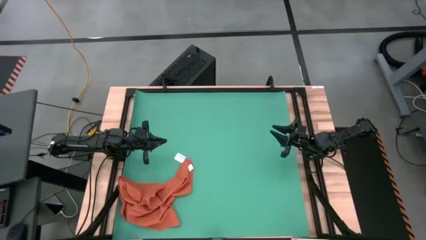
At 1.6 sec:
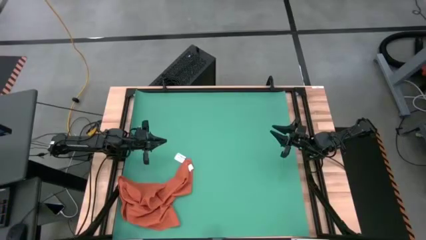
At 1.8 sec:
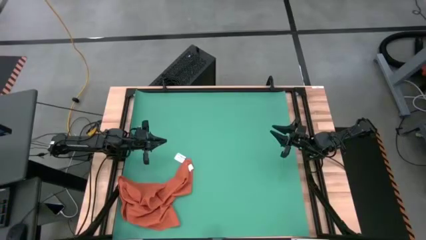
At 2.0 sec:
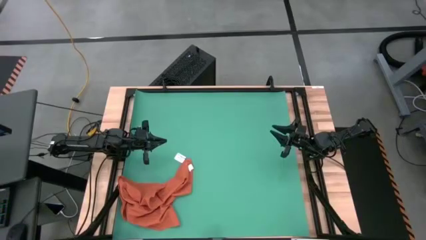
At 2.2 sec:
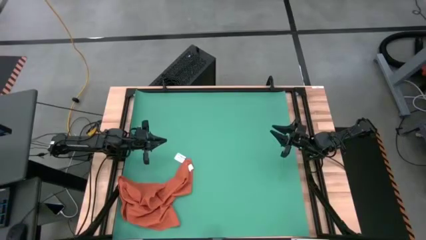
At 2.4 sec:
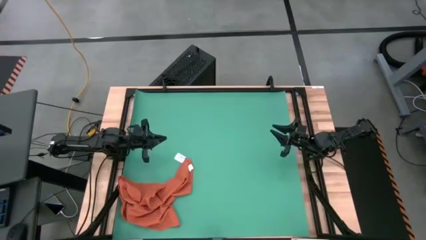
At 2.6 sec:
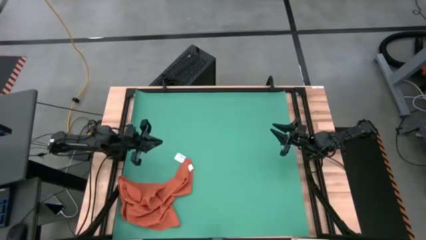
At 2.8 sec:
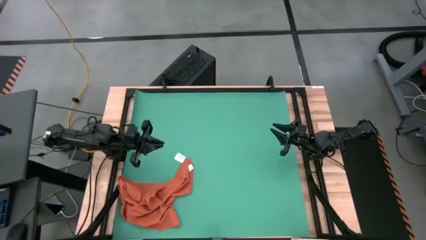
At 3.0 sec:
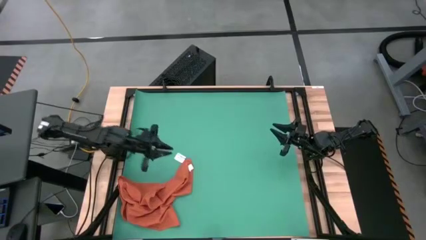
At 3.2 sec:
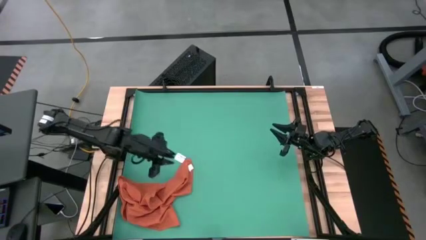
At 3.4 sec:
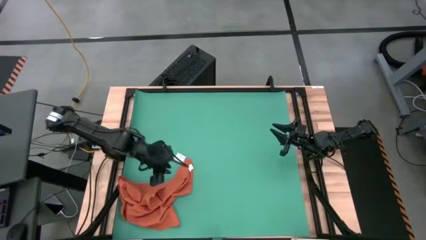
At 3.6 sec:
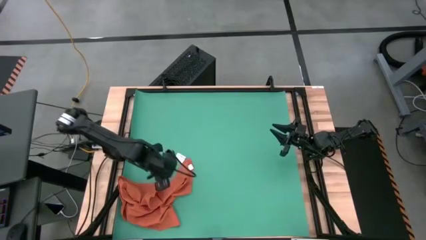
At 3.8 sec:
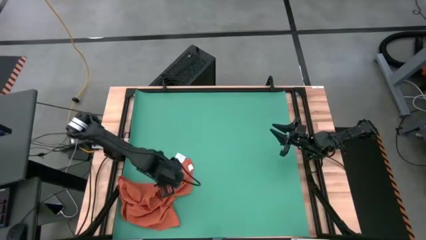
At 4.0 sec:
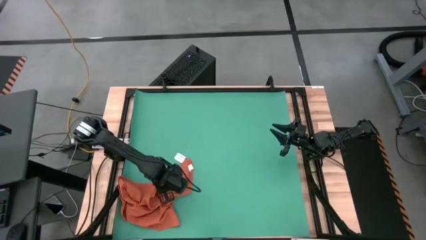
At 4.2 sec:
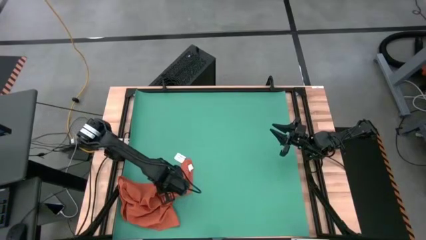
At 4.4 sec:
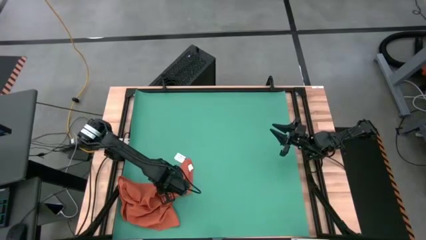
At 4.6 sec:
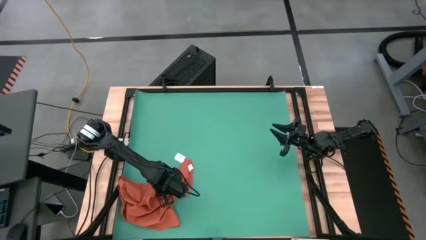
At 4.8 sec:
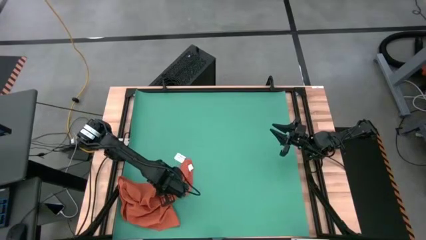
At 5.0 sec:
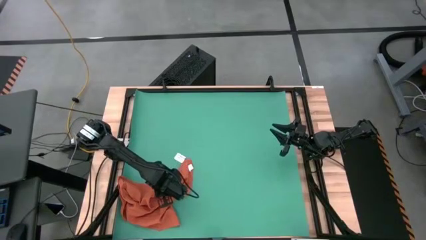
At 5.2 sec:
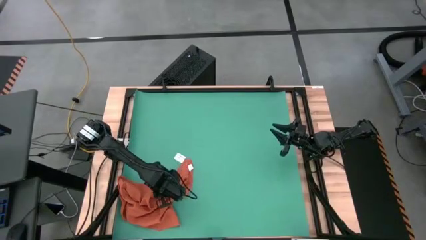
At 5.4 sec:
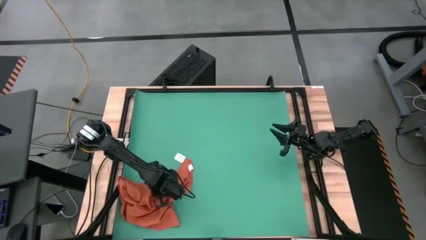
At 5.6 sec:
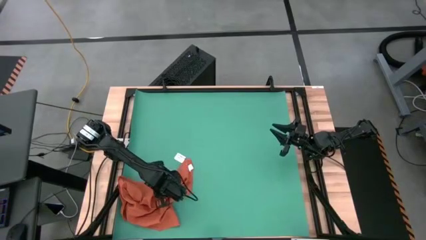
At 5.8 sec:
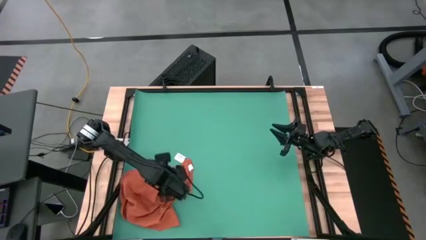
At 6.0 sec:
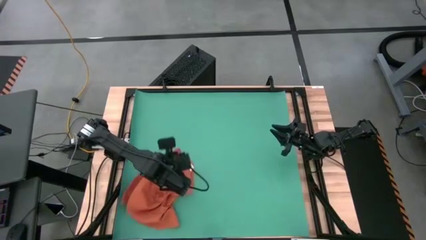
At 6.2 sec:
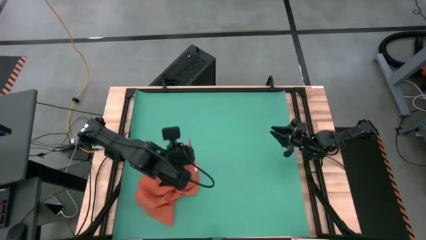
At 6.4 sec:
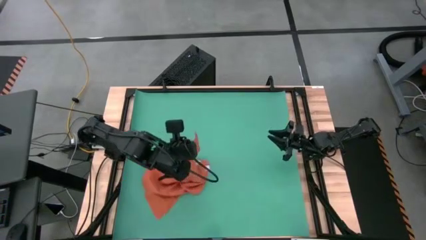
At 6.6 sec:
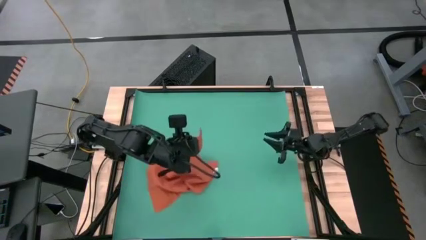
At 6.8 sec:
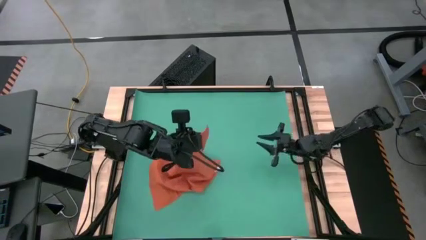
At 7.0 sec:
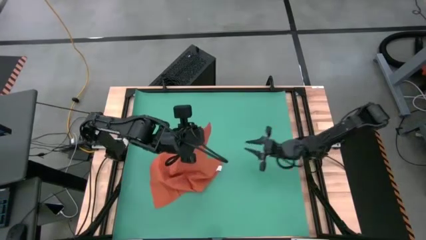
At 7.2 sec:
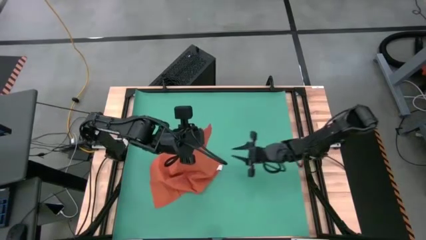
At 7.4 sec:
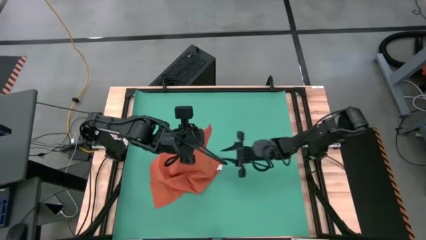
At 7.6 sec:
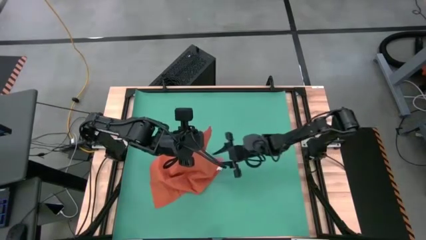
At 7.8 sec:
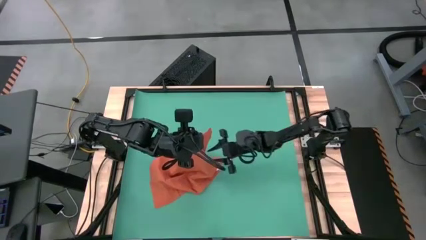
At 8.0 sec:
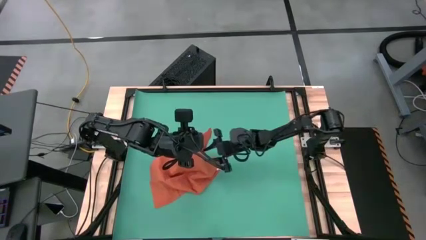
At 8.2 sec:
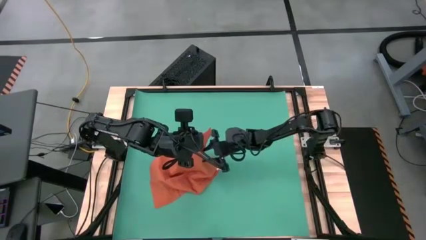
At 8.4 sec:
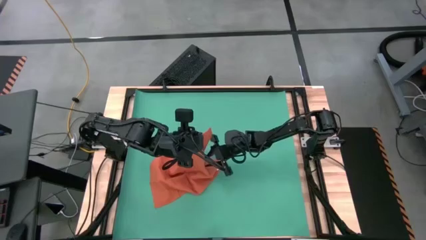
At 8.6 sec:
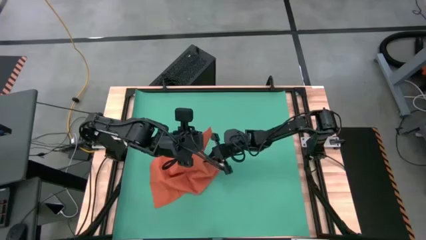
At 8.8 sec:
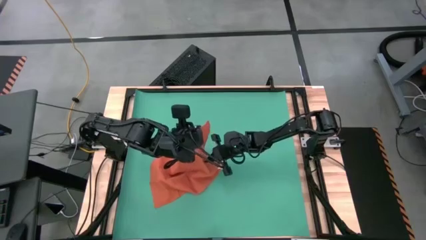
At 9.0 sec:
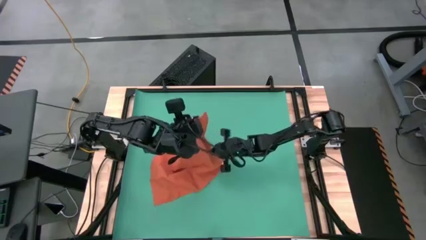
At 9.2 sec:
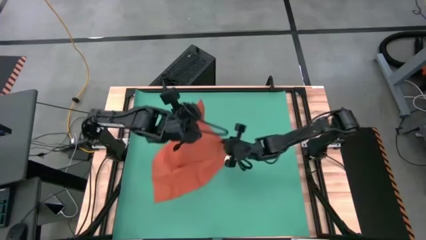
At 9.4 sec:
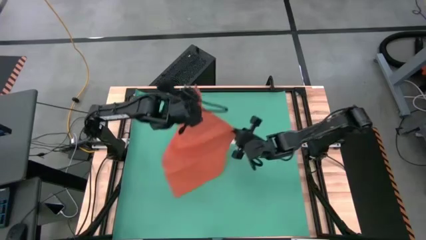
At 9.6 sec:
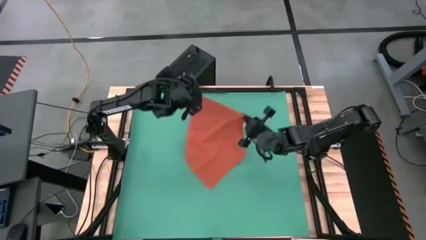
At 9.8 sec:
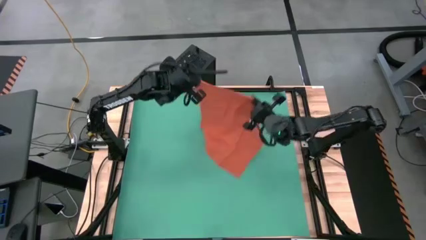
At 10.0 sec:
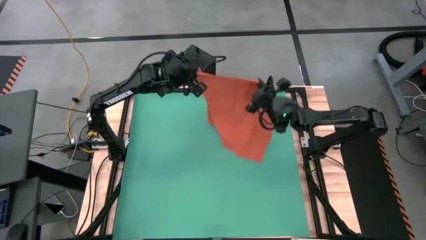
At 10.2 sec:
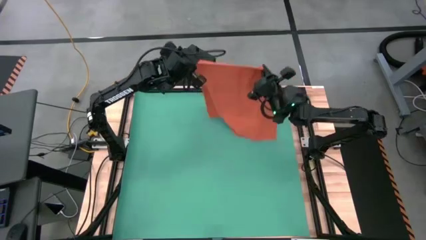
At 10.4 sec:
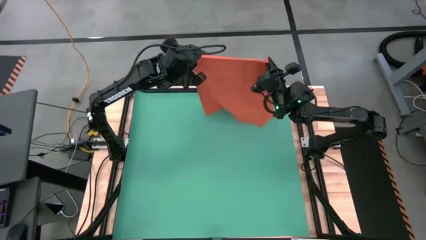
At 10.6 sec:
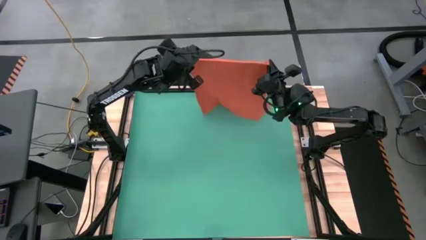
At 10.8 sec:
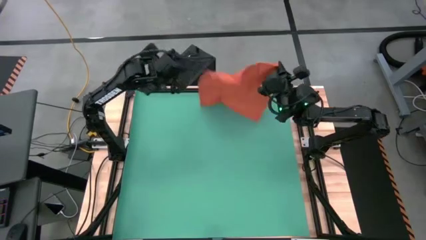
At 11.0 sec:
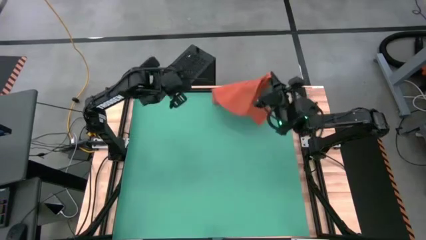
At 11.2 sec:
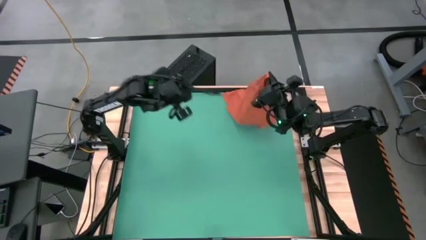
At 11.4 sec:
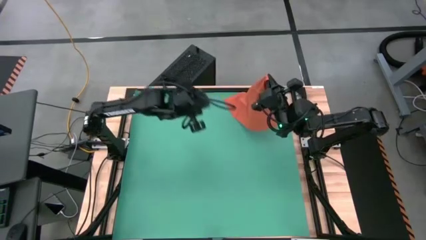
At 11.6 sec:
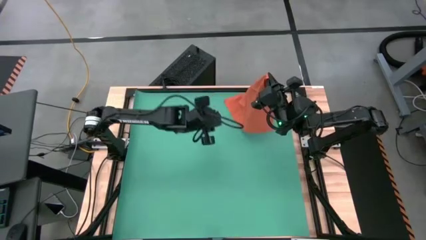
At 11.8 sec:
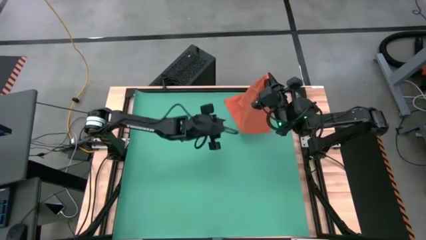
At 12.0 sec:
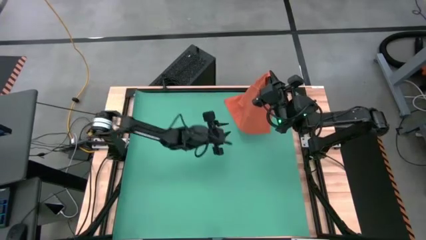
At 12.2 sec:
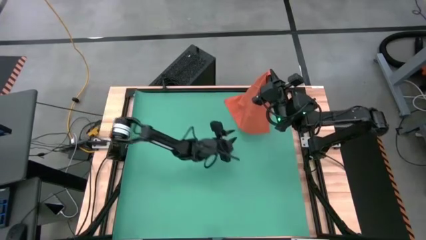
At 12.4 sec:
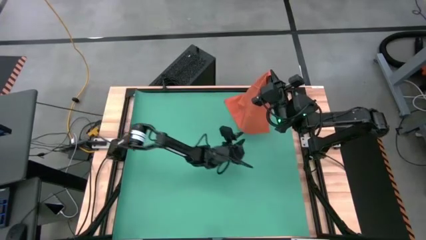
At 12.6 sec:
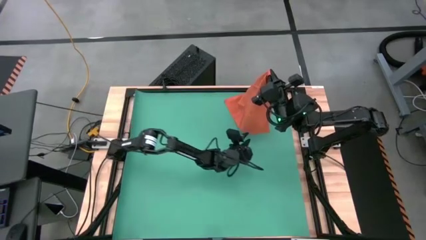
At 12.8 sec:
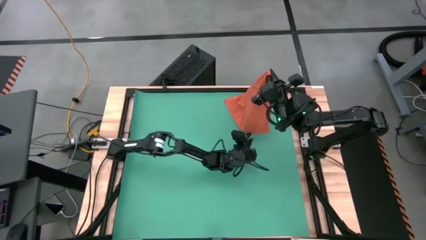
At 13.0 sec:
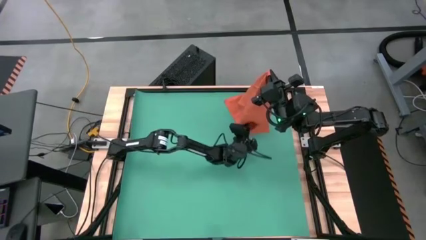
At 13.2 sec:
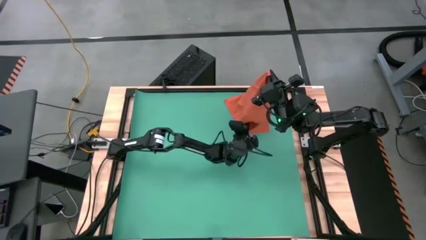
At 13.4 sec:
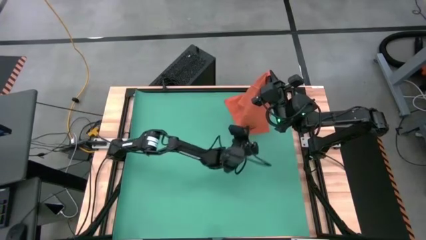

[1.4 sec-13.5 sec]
Task: Roll towel
Fold the orange towel
